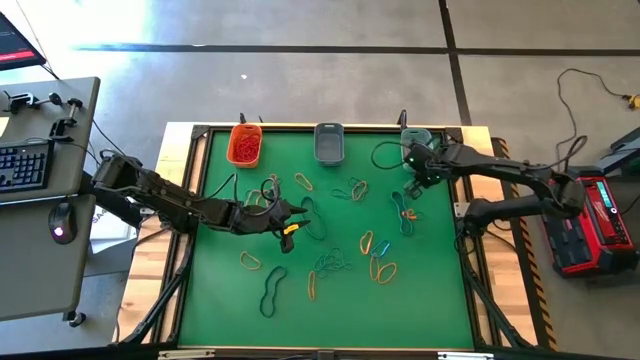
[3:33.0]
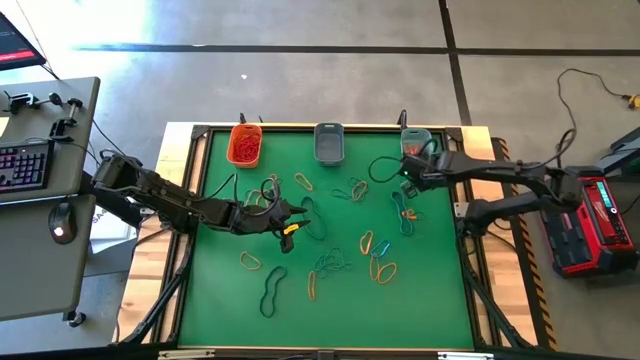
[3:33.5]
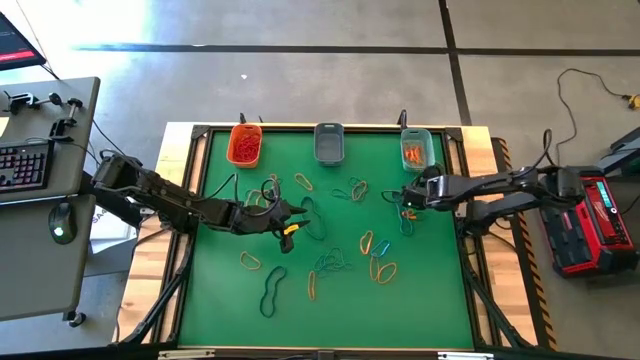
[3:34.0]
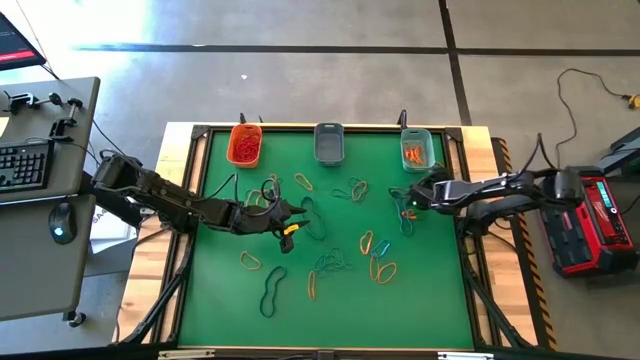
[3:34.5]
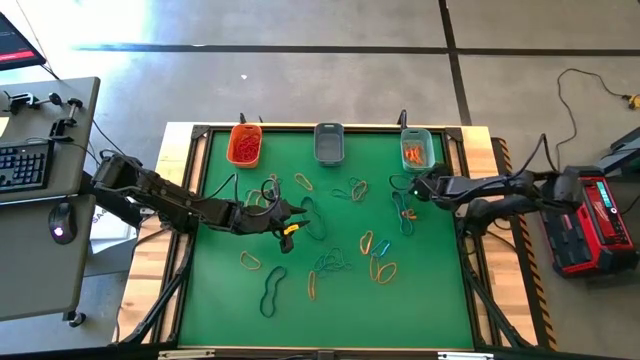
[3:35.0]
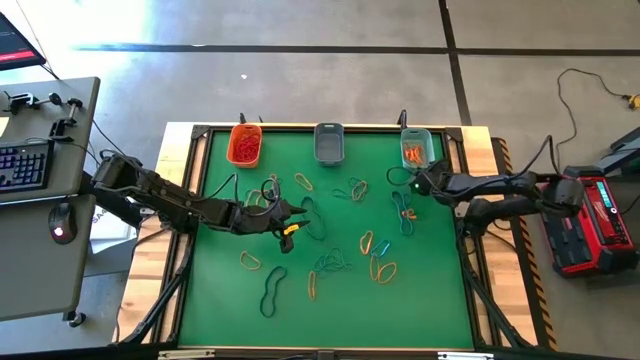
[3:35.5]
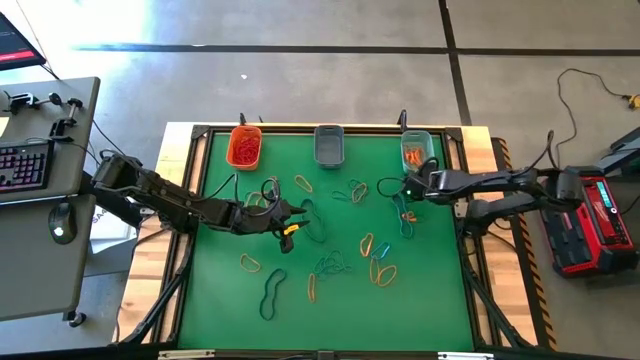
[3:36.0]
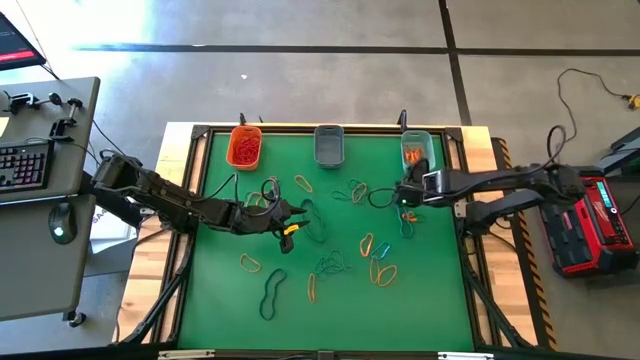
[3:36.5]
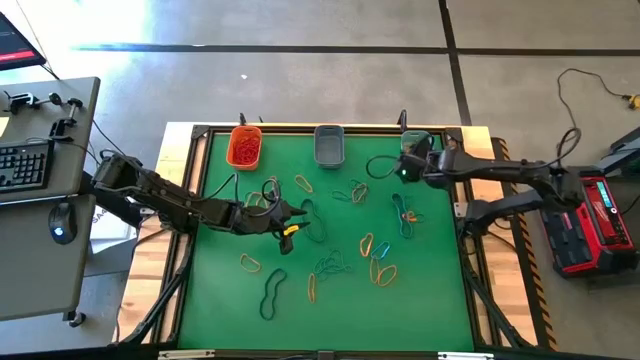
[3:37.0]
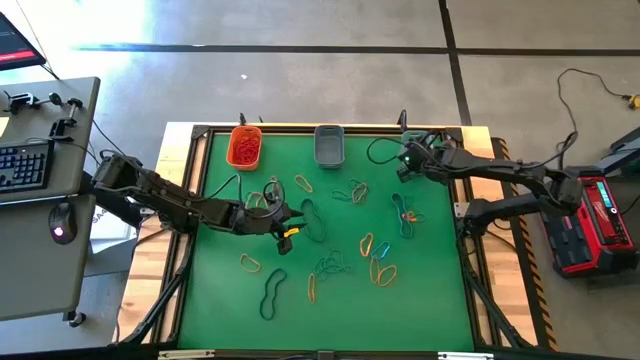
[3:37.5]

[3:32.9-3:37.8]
Task: Sort rubber bands into baskets
Put the orange rubber band into the green bin

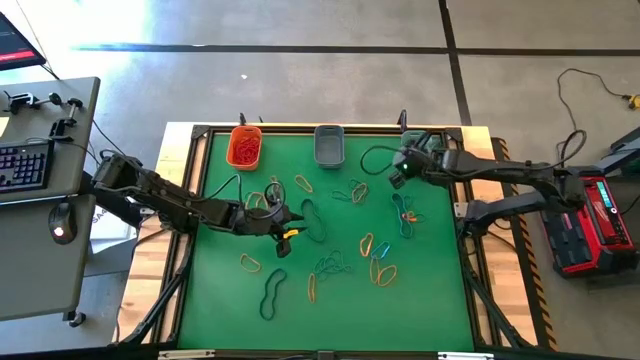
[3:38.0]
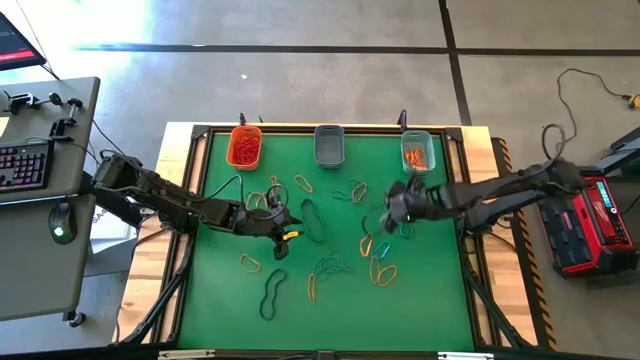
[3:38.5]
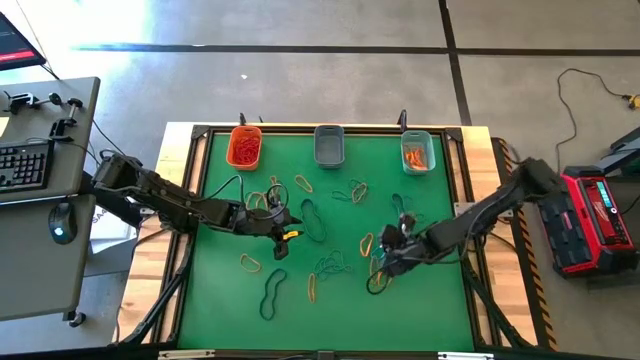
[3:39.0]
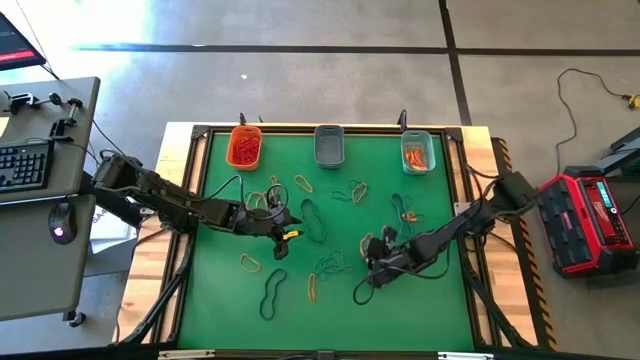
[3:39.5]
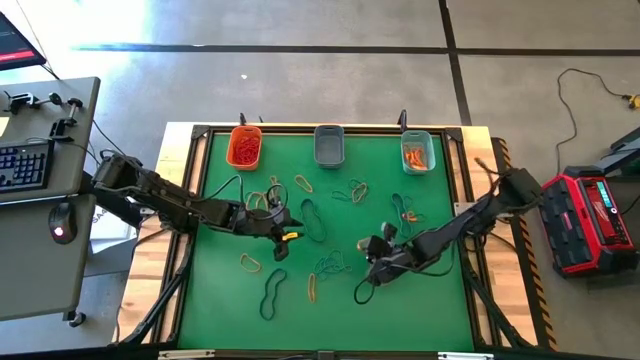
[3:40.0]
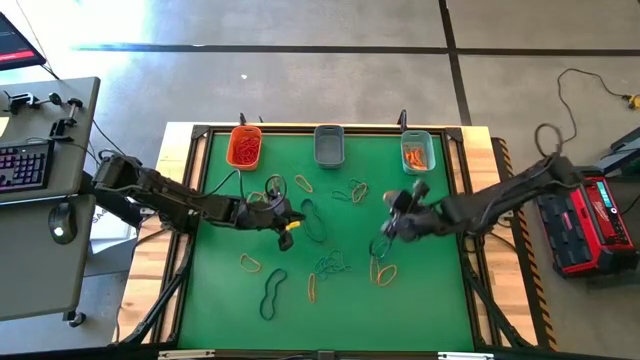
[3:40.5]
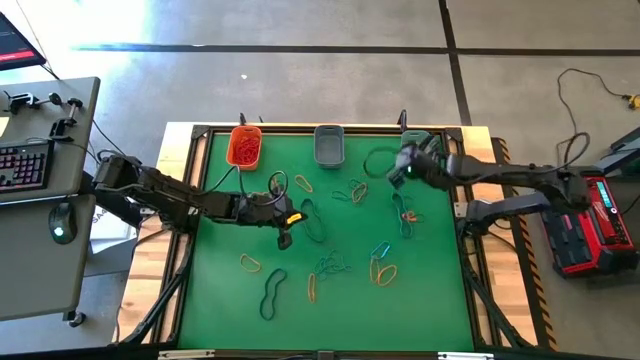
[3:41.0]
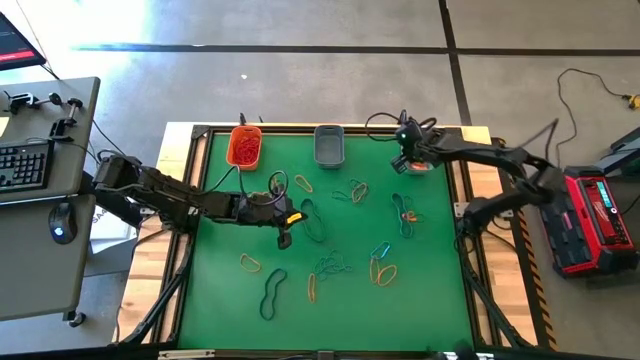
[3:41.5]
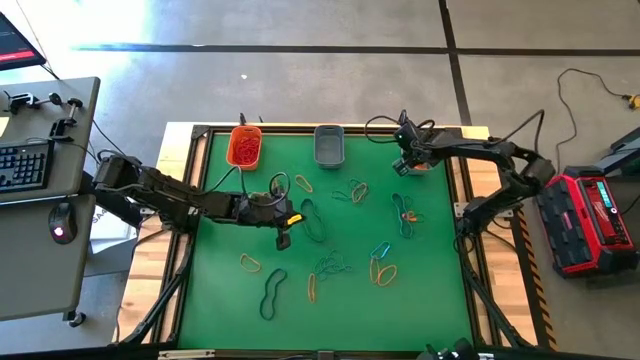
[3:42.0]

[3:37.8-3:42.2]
Put the orange rubber band into the green bin

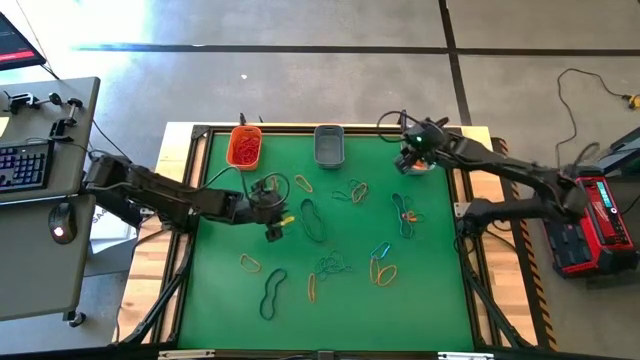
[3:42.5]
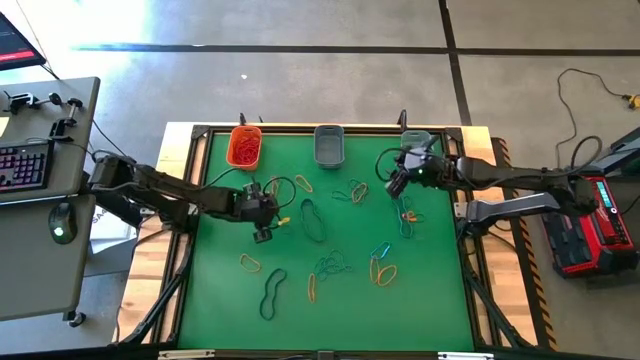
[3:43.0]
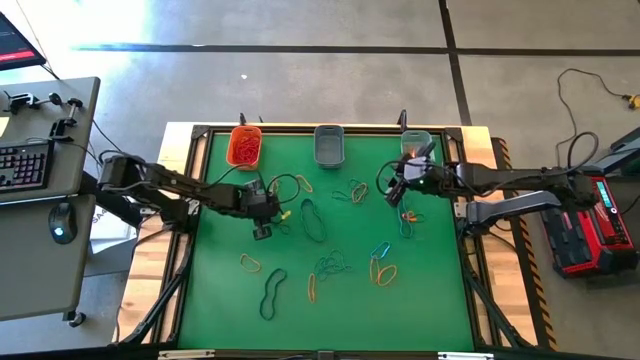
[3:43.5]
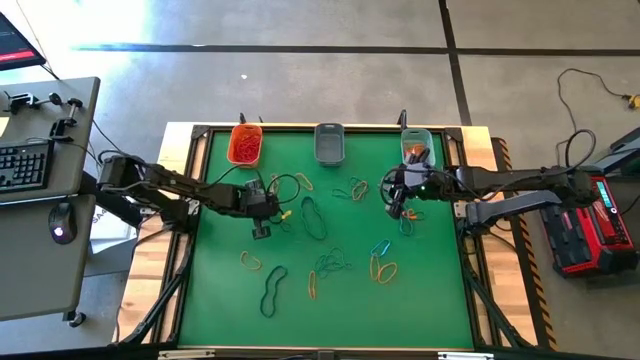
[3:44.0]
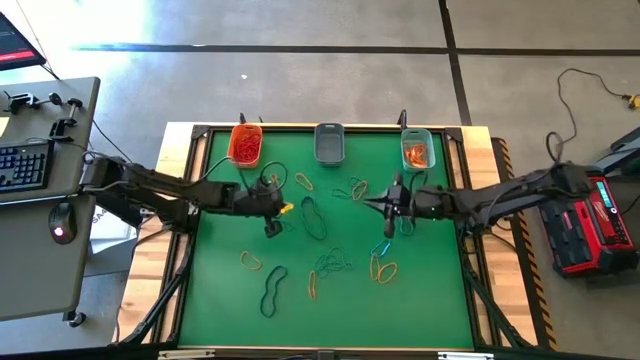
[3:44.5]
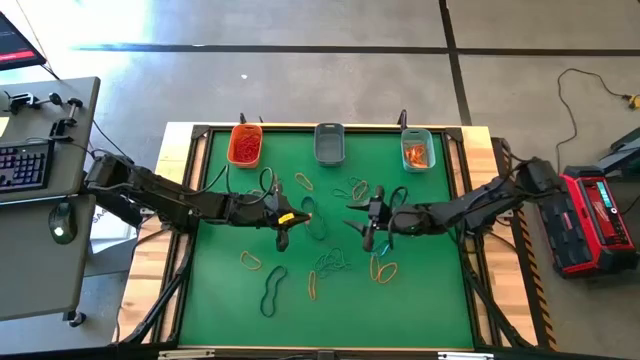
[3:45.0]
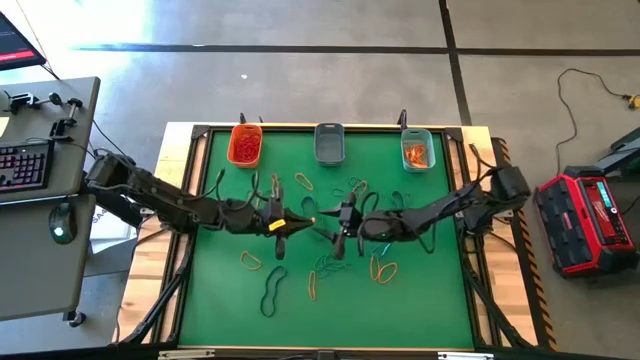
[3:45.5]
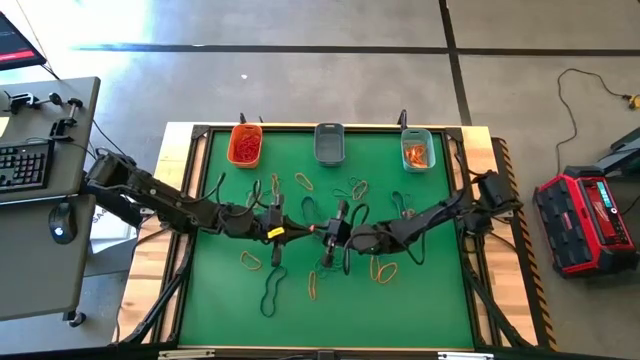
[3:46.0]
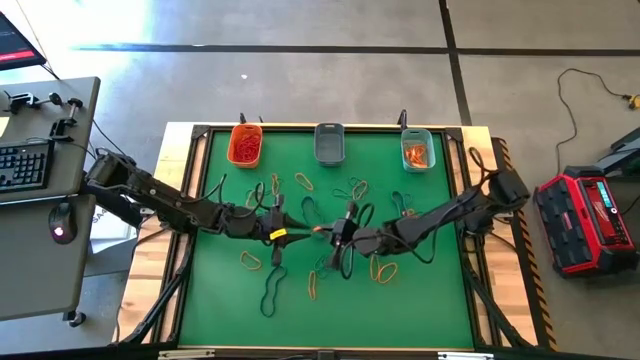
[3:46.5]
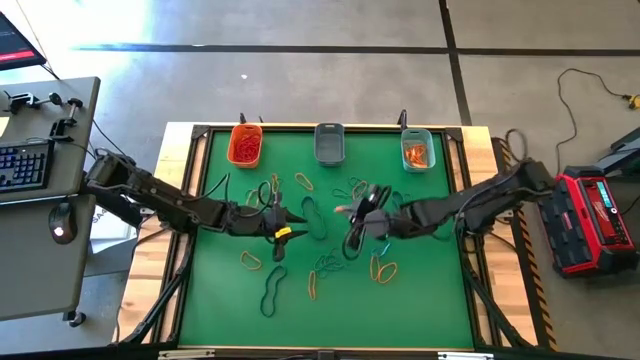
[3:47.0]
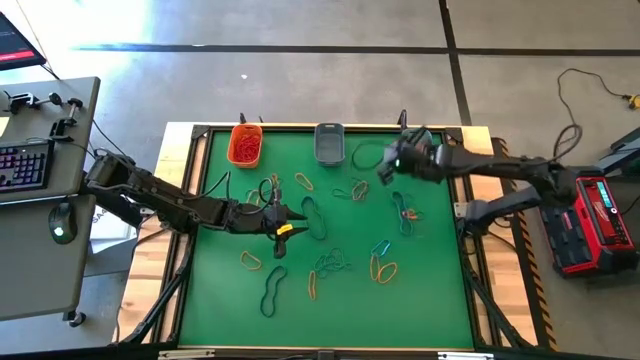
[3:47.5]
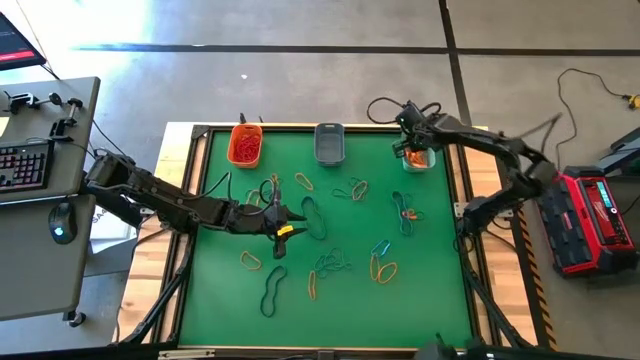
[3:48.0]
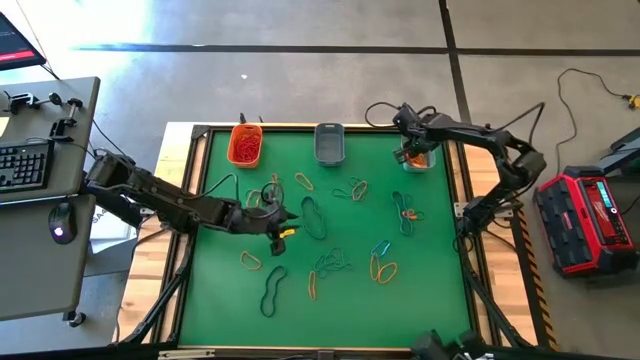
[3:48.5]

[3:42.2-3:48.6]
Put the orange rubber band into the green bin

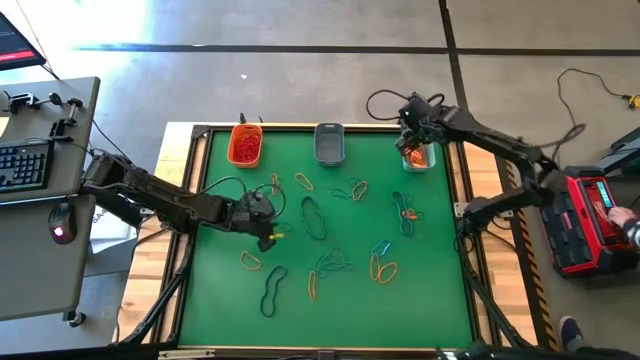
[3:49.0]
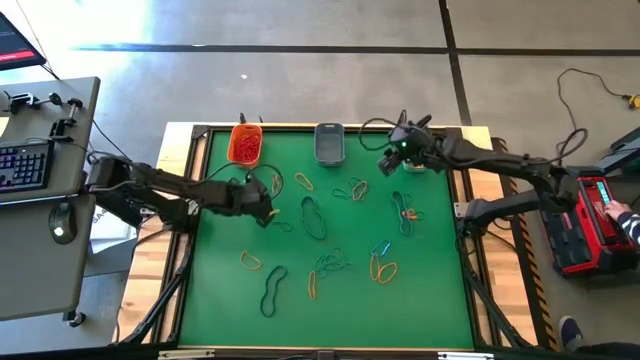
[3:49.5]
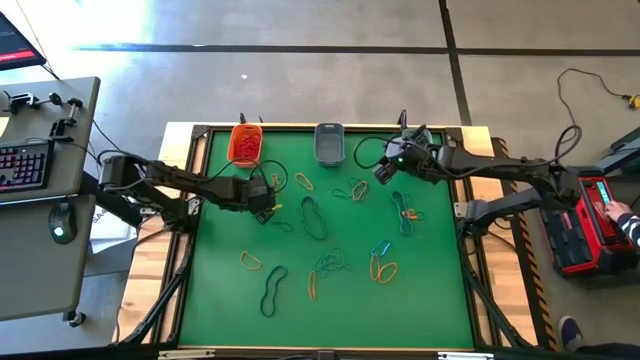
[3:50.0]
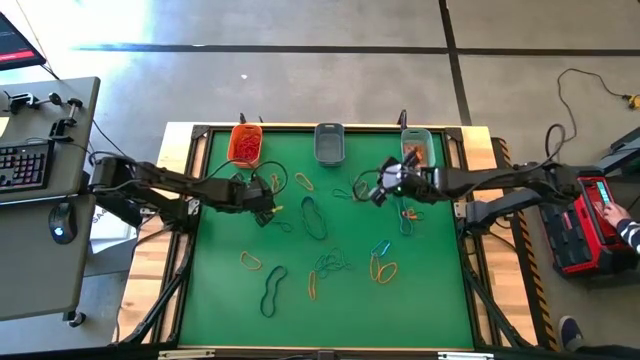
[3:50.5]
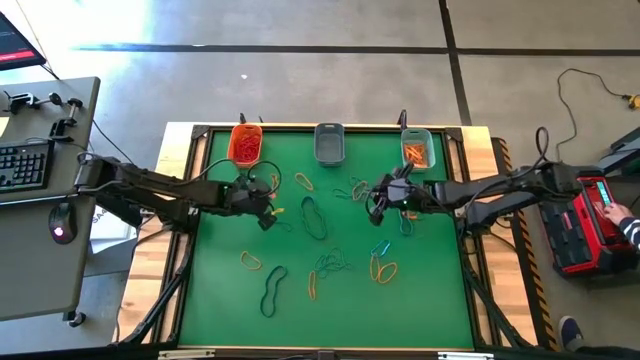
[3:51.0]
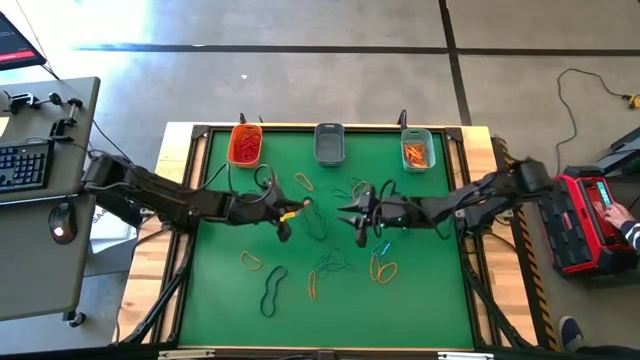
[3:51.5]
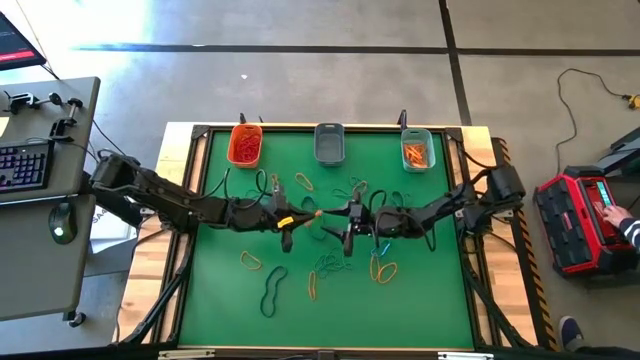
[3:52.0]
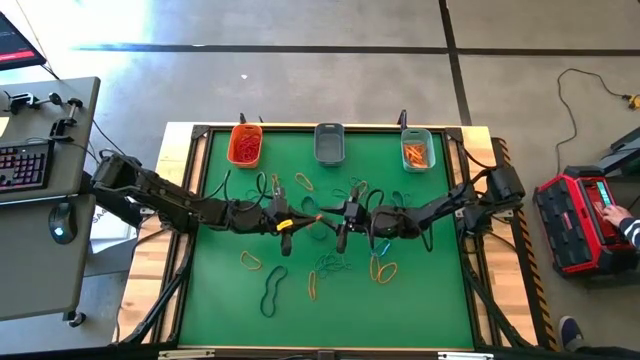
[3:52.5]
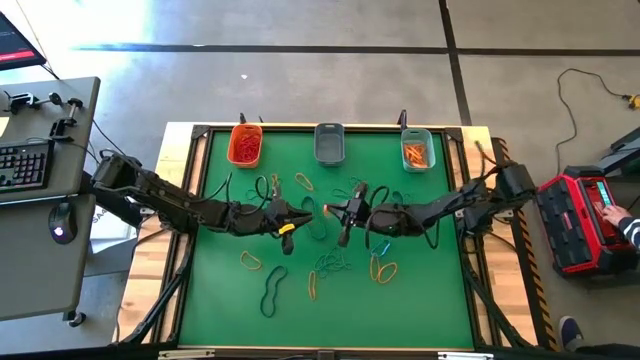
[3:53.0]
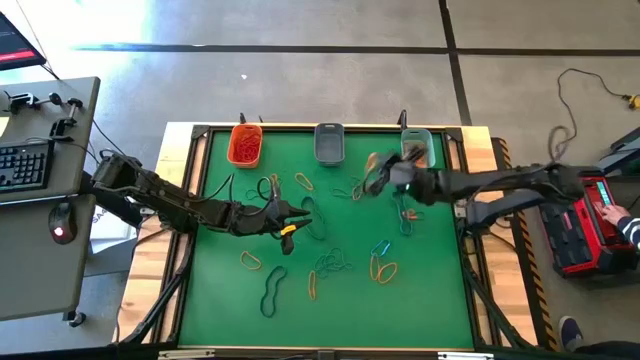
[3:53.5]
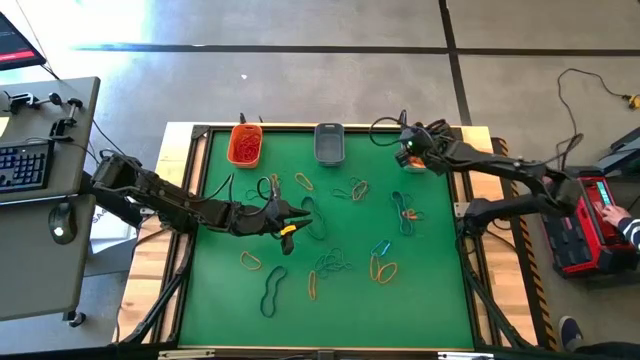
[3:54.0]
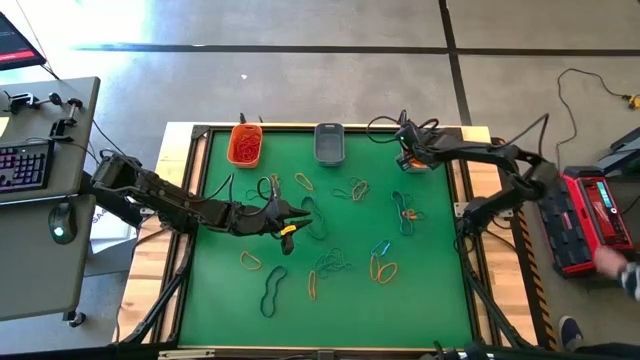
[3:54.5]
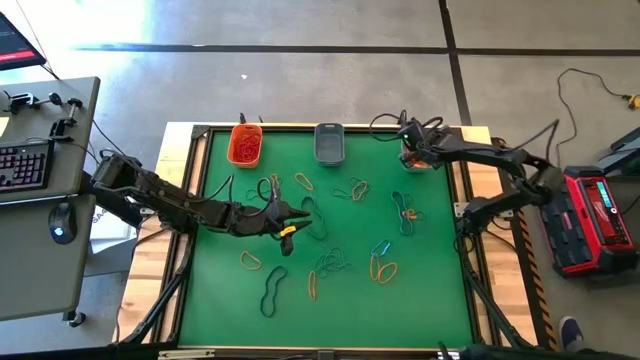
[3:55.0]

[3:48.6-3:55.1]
Put the orange rubber band into the green bin
